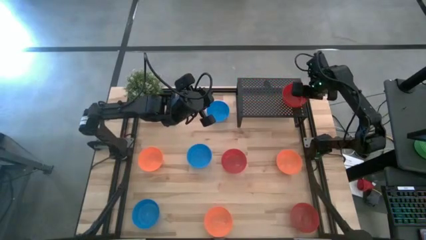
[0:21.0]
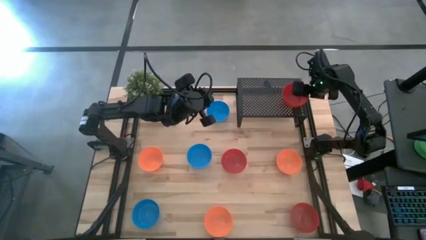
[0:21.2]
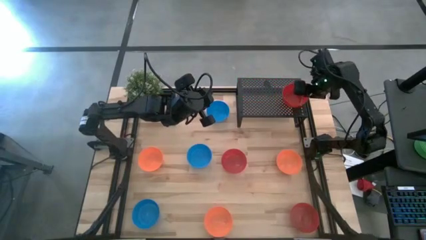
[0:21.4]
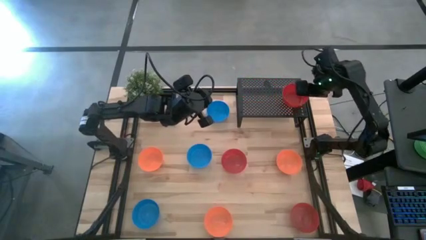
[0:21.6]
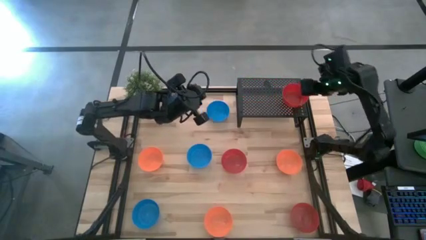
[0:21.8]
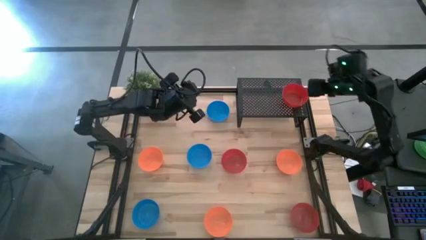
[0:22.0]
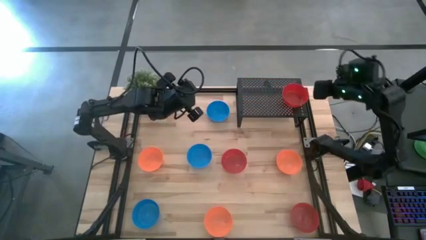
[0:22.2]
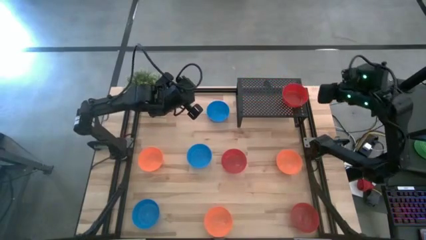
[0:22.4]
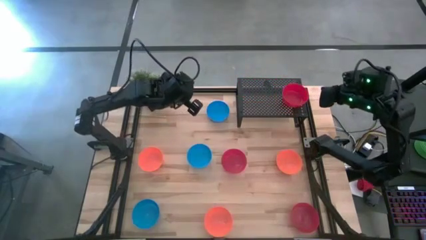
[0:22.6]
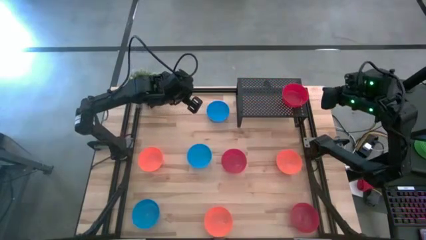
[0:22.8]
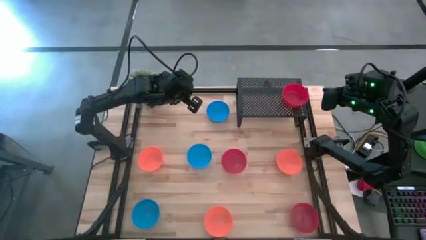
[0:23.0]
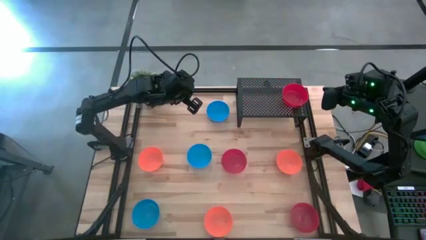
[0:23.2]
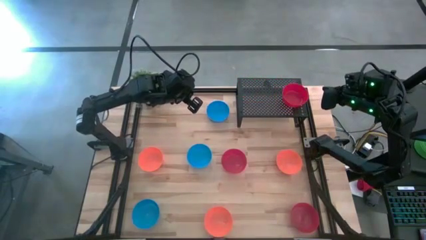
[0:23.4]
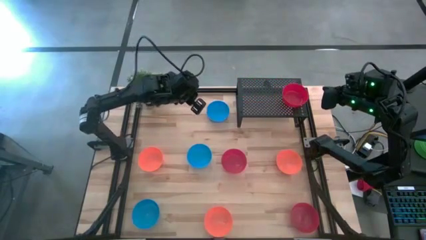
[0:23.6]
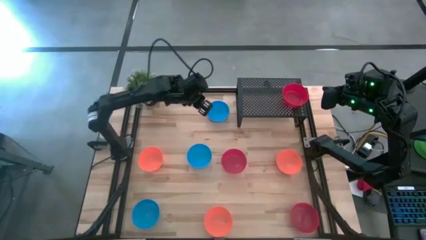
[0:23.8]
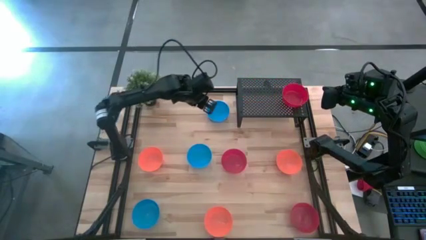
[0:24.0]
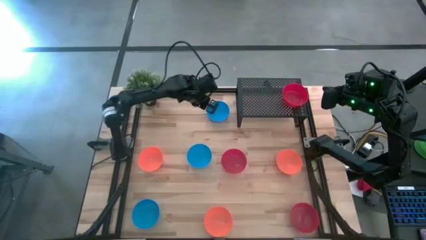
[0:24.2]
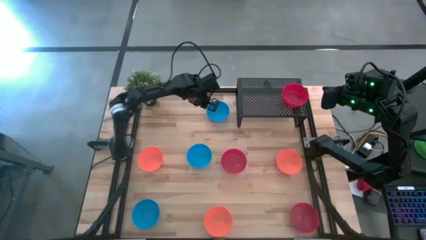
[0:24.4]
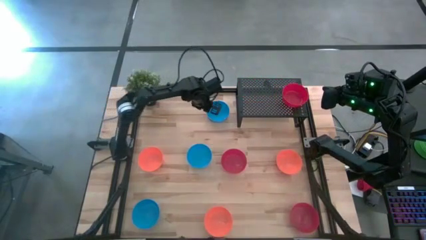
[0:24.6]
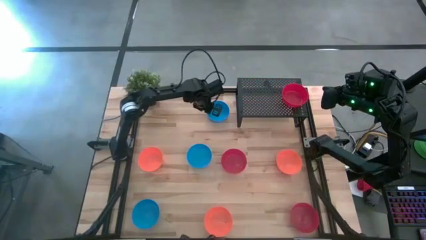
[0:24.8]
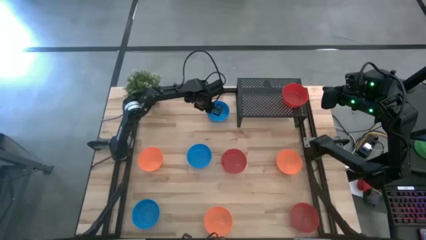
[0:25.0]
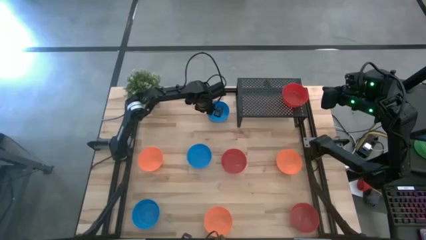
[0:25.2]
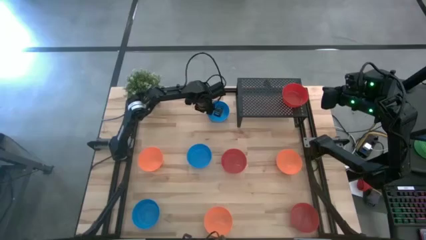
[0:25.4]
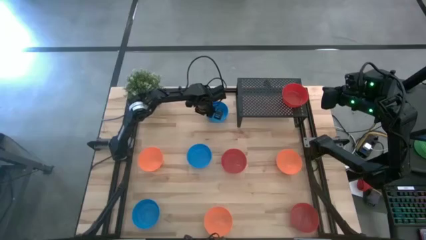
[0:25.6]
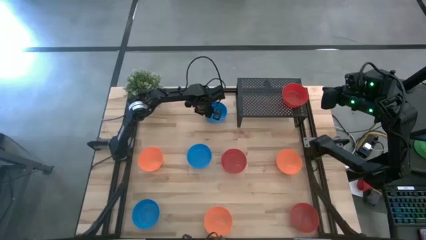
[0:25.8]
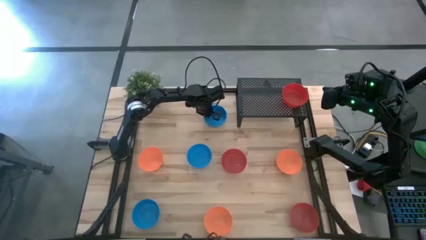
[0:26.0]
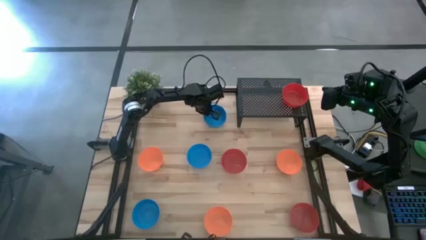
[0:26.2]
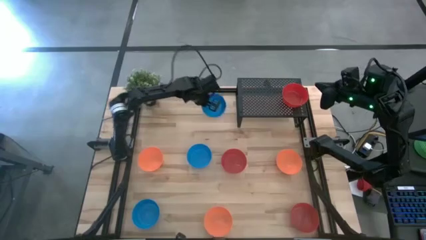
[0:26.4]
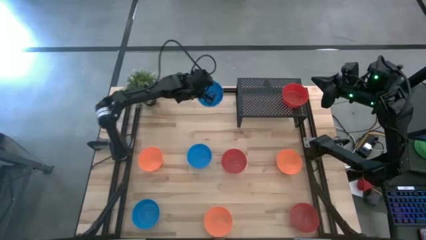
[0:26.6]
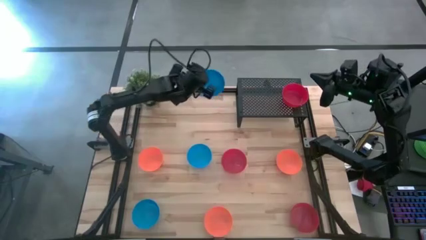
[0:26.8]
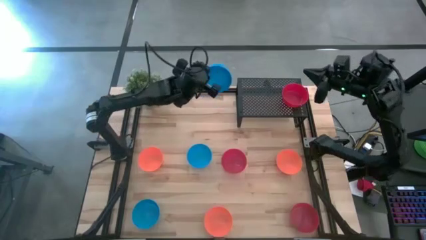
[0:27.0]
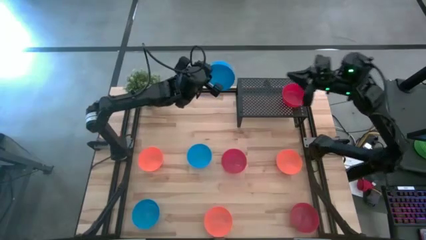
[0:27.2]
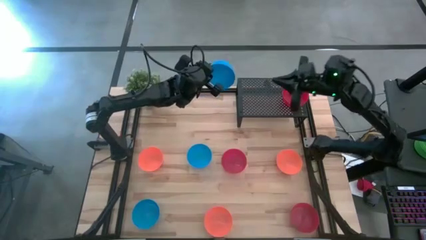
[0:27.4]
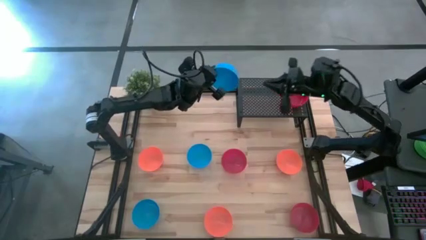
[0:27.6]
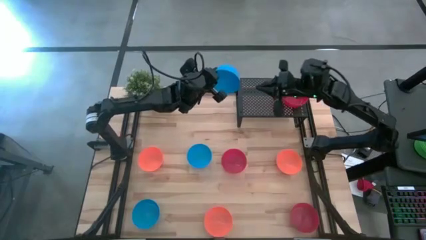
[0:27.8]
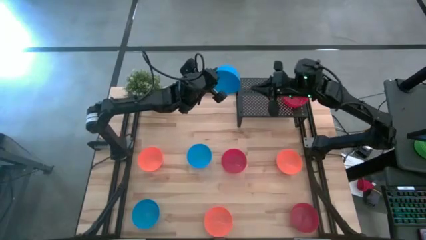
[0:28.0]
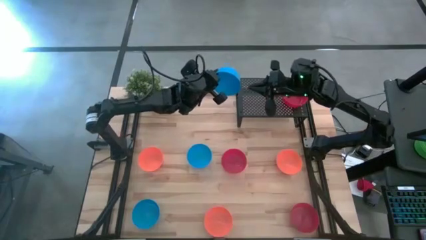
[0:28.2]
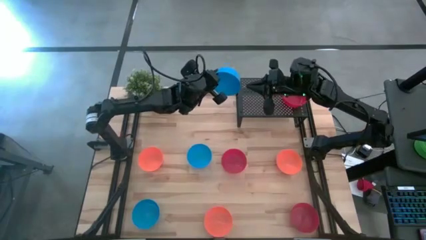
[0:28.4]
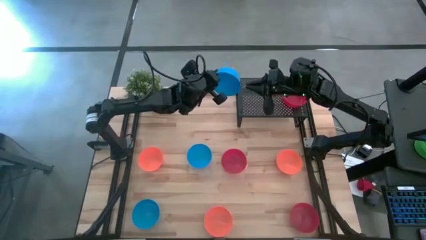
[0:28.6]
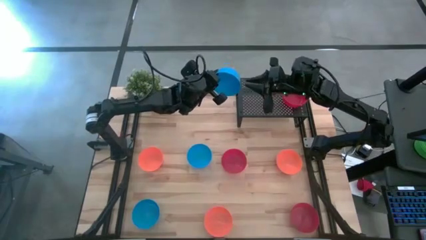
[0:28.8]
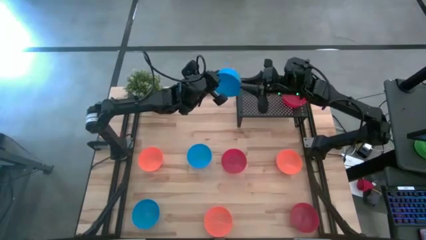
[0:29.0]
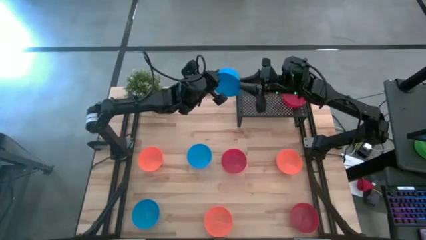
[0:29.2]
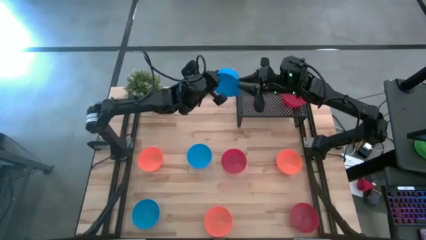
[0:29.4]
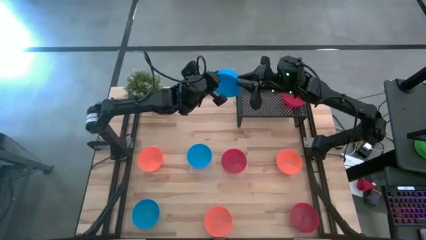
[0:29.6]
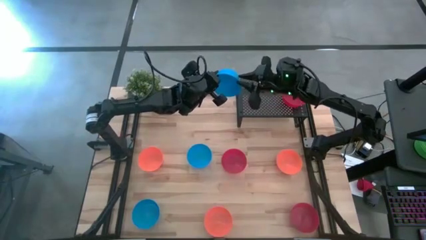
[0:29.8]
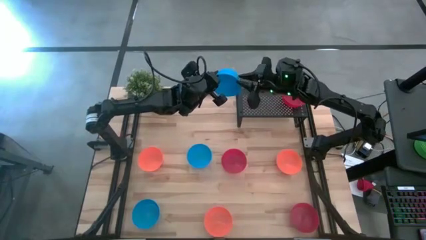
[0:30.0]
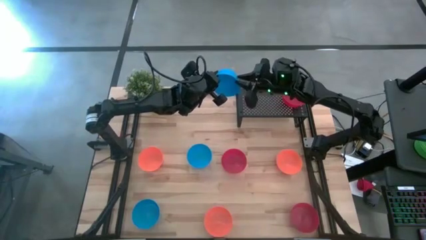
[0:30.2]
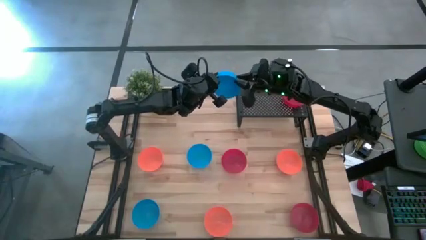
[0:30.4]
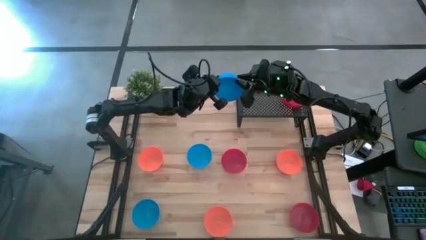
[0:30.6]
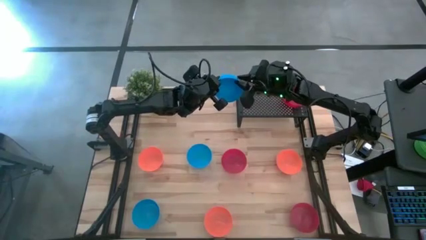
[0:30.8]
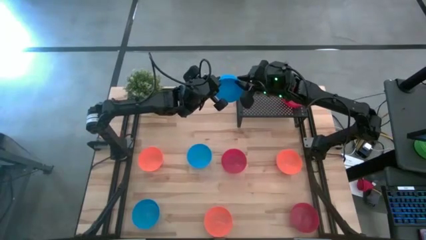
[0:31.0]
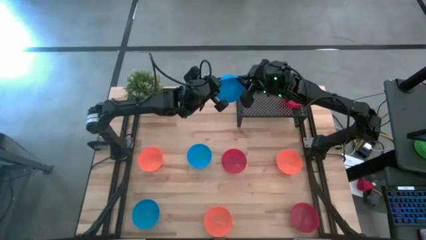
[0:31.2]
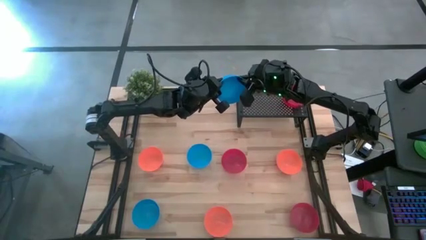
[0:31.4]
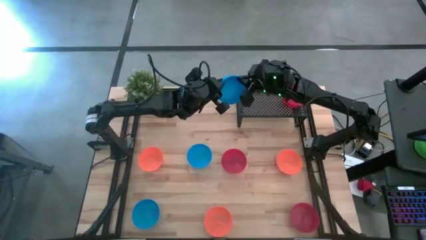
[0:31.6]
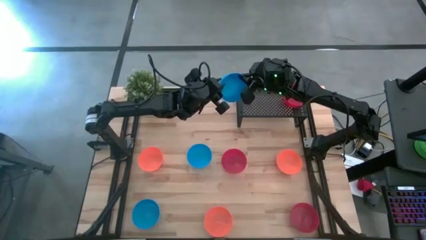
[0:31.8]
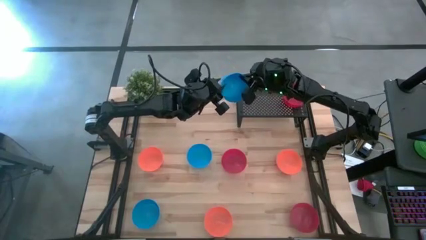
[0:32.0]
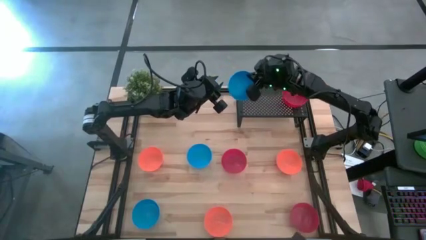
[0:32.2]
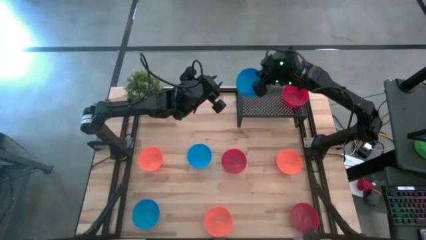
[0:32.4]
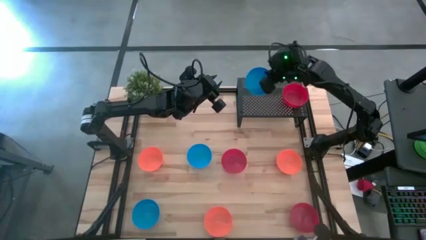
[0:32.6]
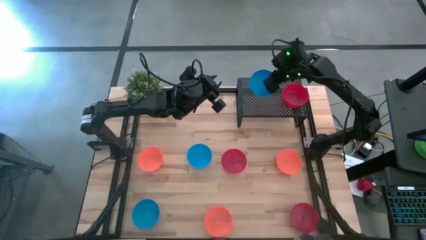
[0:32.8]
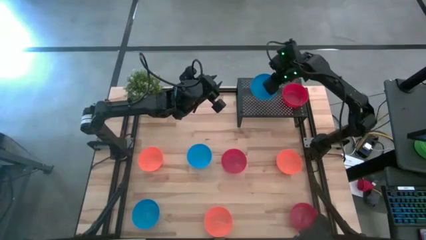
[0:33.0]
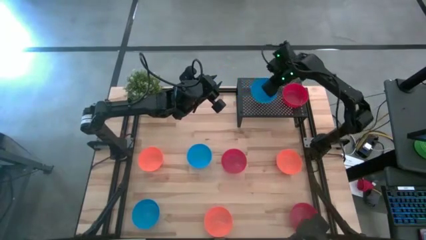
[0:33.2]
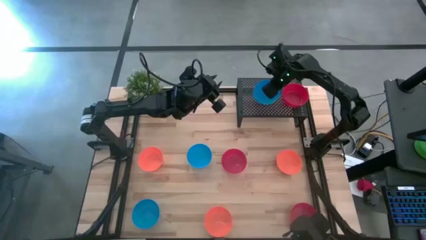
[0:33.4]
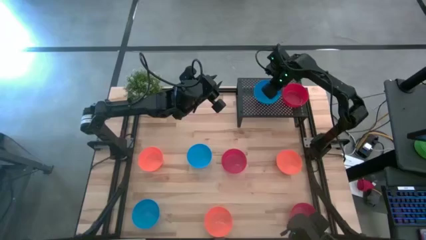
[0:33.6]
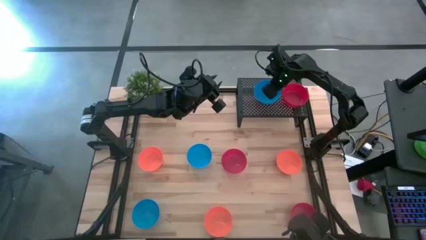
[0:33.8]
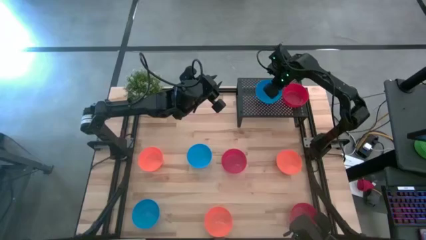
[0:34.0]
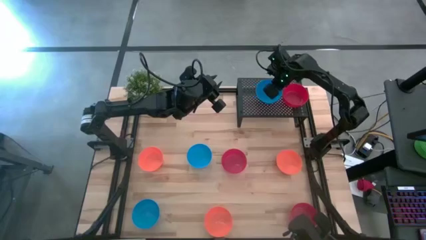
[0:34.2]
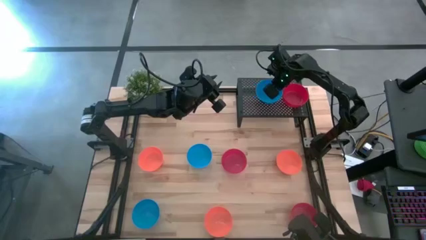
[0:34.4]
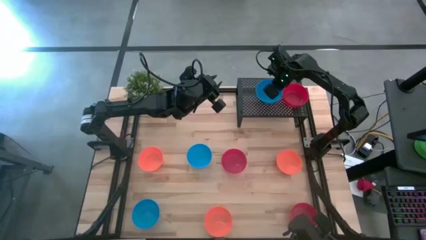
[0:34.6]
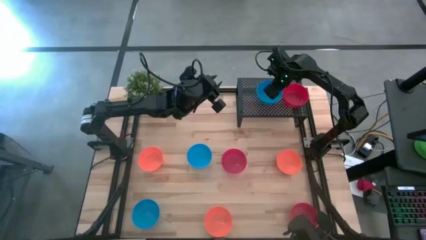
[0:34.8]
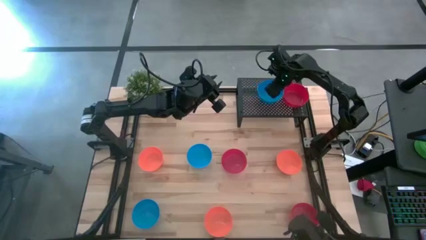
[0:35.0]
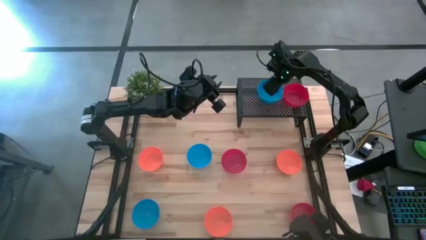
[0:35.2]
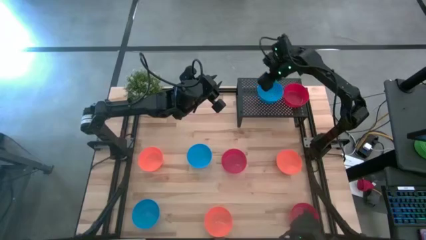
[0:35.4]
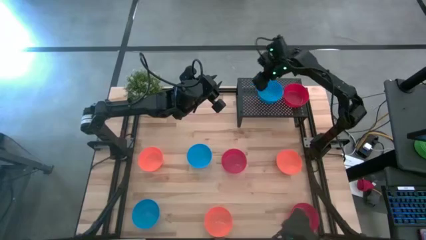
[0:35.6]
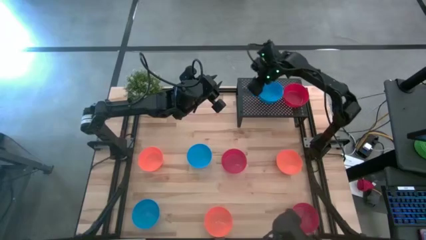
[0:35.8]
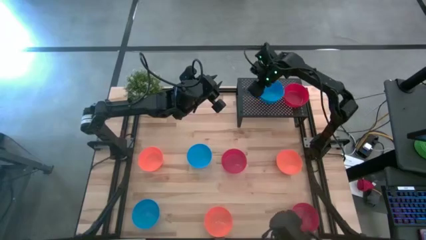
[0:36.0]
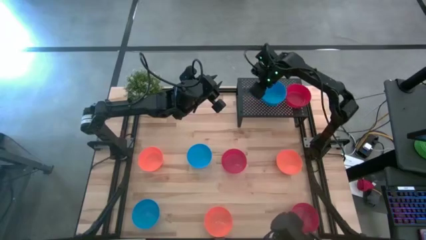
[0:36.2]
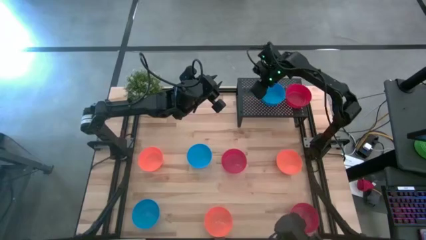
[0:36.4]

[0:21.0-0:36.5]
Task: Pick & Place Mini bowls
Put the top blue bowl on the shelf
